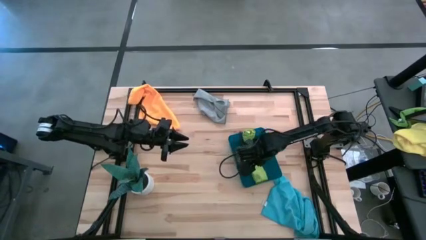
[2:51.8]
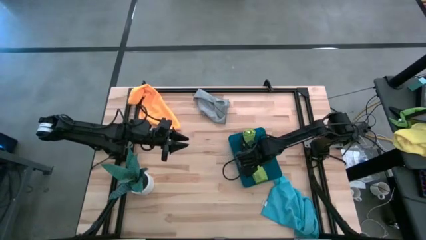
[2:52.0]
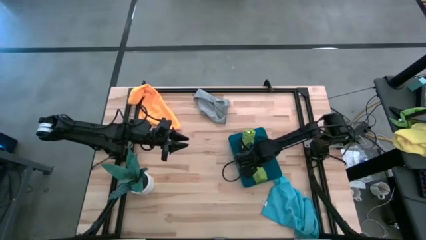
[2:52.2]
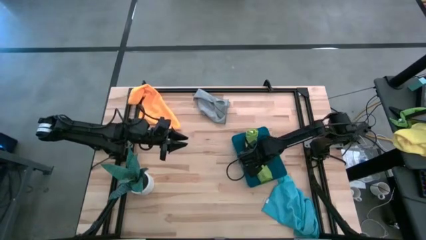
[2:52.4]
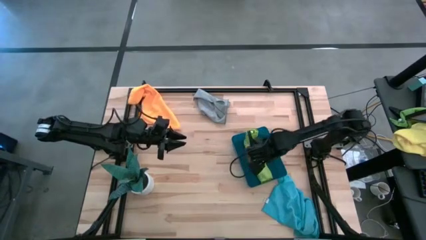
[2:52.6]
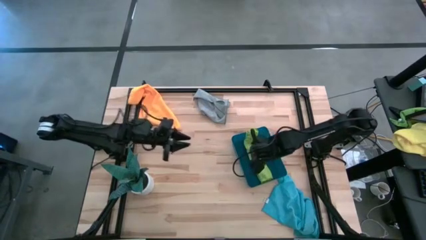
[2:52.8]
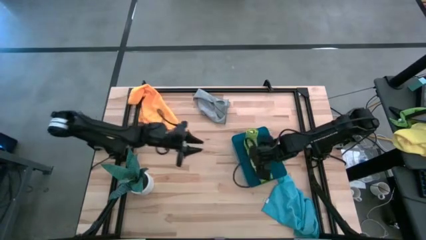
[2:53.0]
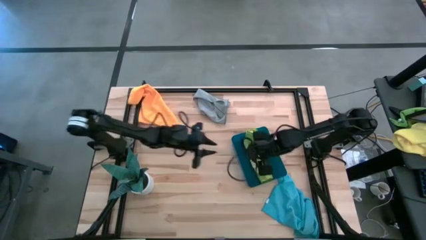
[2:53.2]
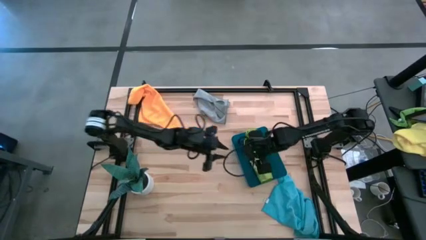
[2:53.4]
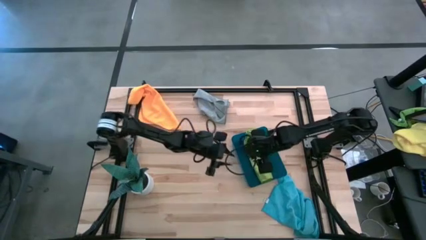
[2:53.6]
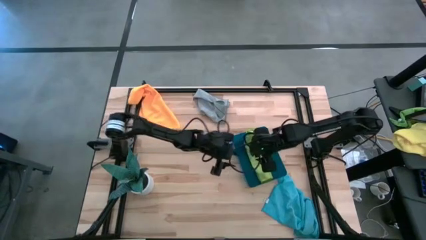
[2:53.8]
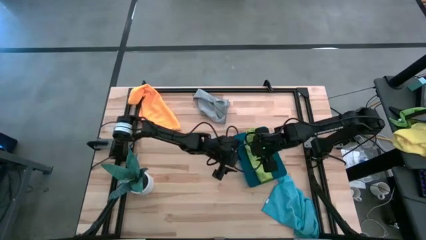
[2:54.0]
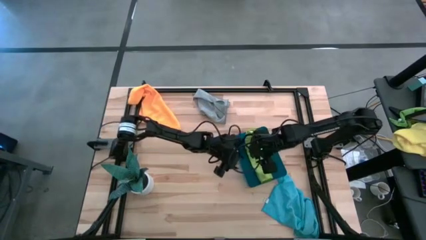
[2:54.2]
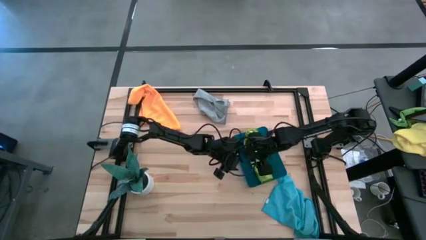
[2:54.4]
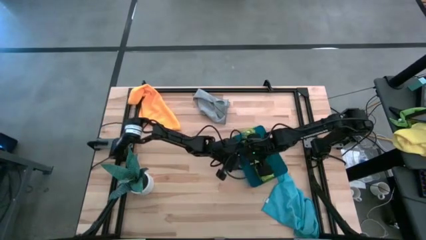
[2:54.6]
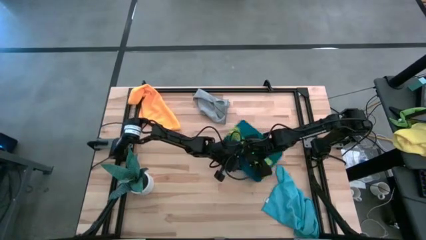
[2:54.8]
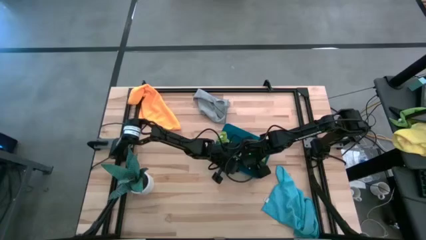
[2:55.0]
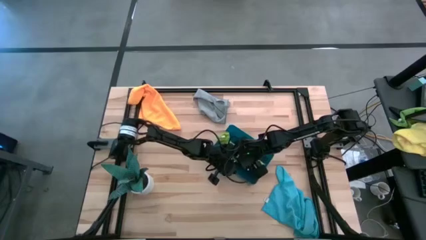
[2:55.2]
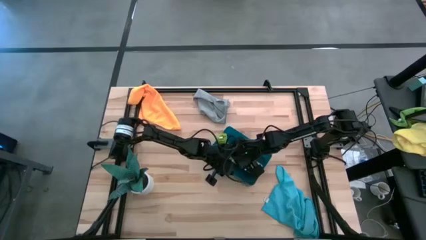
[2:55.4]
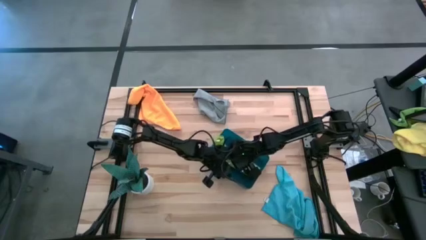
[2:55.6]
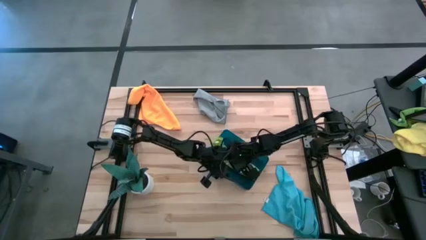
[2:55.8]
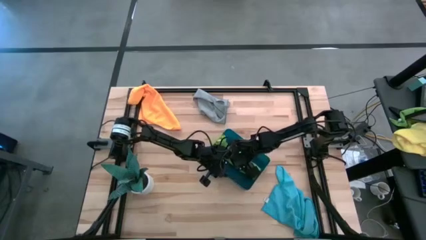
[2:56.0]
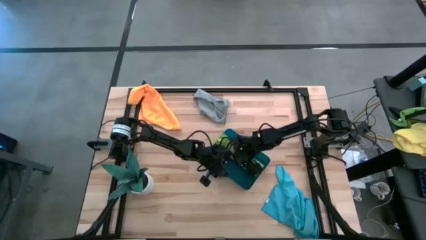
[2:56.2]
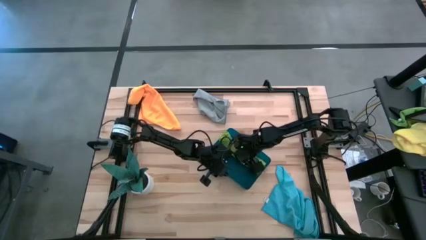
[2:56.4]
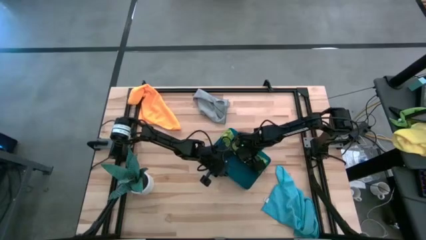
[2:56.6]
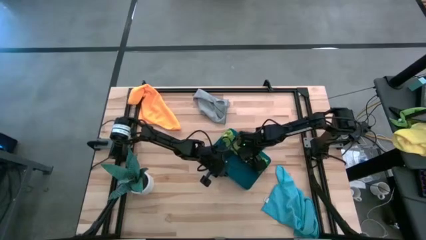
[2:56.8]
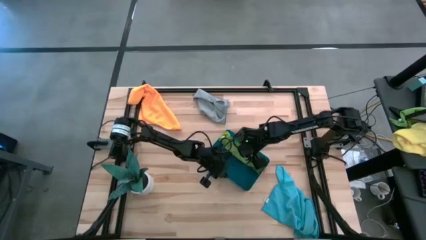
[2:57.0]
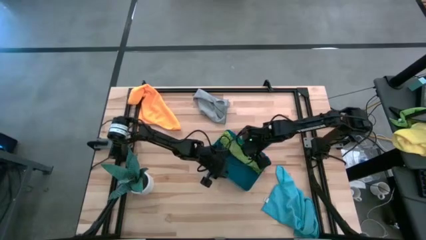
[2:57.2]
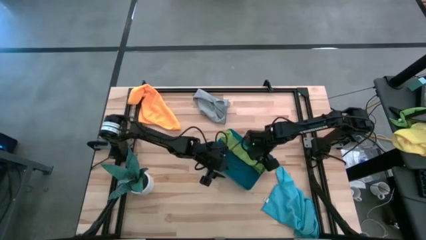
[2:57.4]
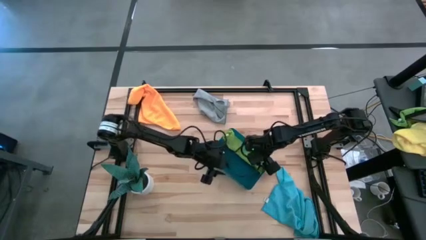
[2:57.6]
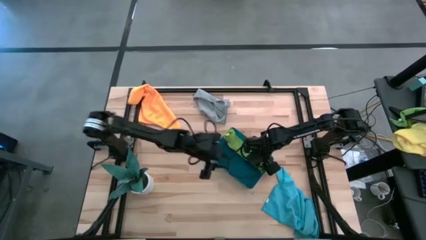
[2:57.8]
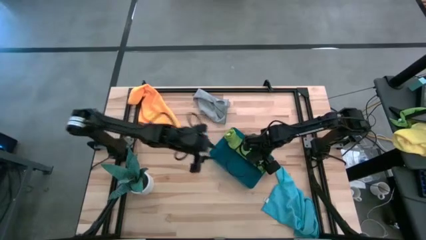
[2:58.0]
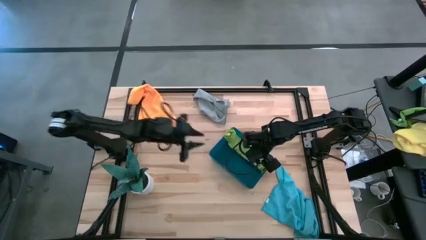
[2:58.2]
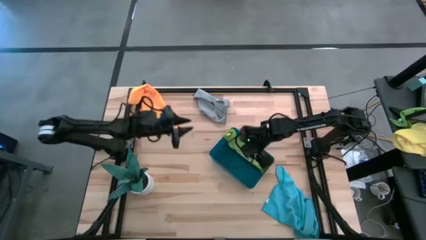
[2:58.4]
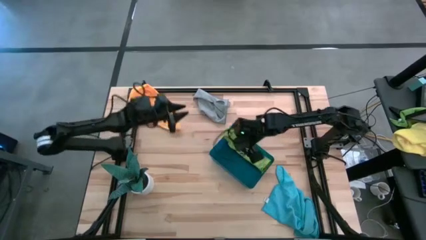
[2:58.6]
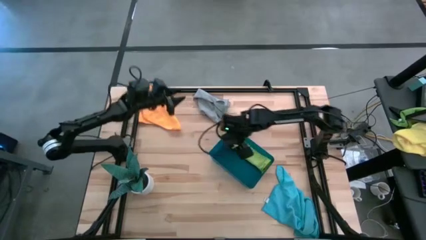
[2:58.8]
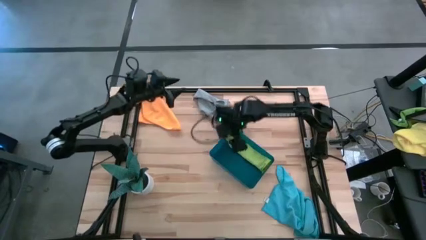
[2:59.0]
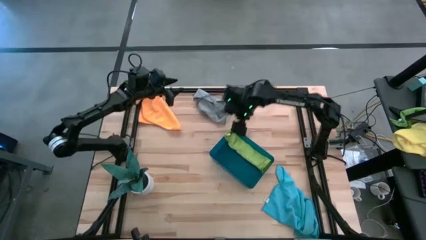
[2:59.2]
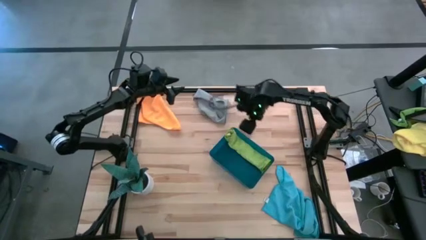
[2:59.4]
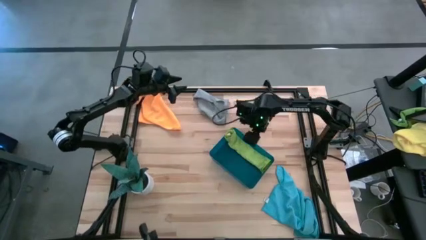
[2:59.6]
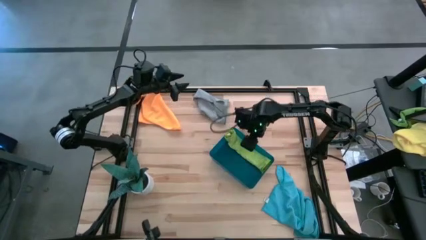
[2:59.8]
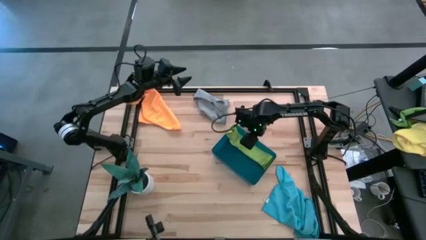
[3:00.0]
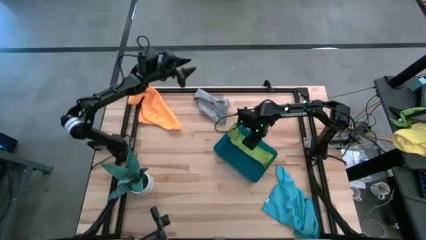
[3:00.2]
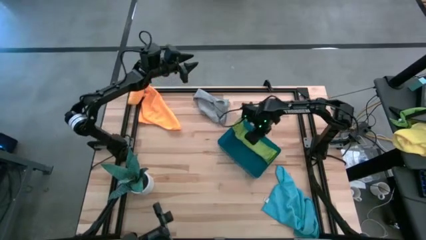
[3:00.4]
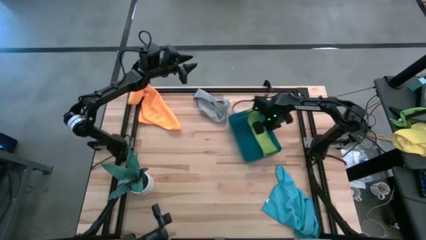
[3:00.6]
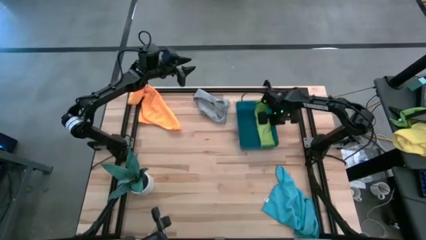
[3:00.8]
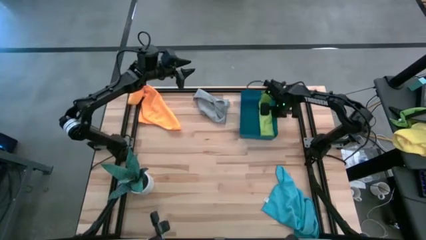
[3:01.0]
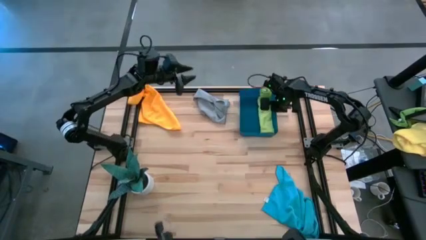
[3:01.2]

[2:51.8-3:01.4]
Task: Roll microfiber towels into tight, uniform cylinder then place into a basket
Move the blue bin to the top right of the table

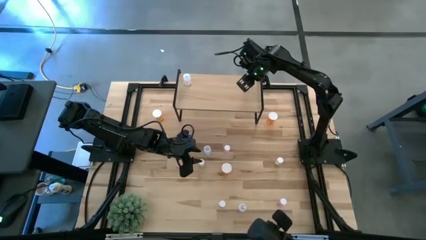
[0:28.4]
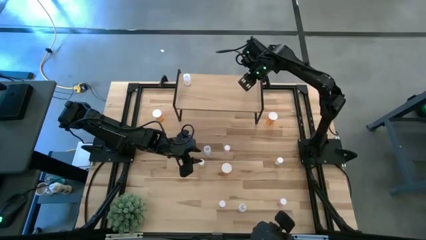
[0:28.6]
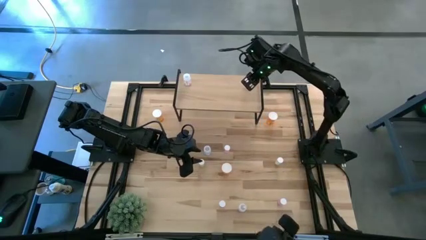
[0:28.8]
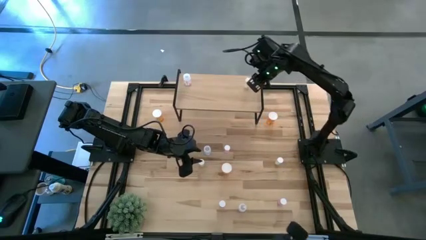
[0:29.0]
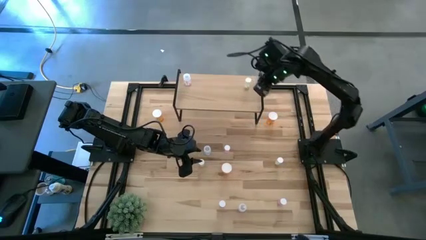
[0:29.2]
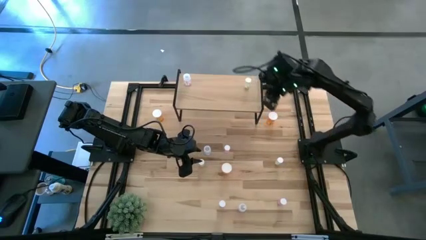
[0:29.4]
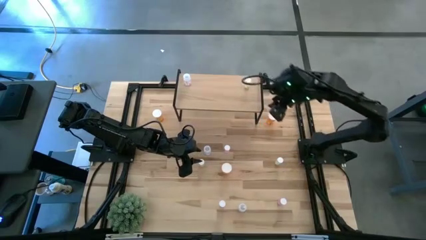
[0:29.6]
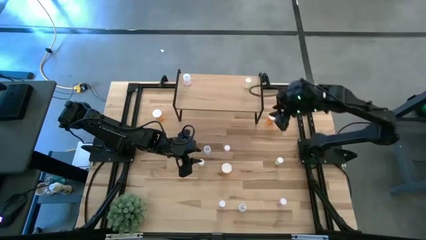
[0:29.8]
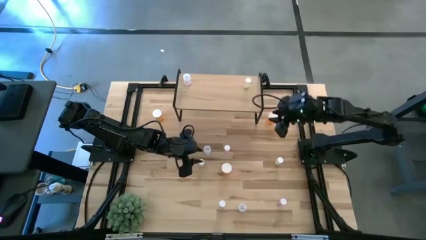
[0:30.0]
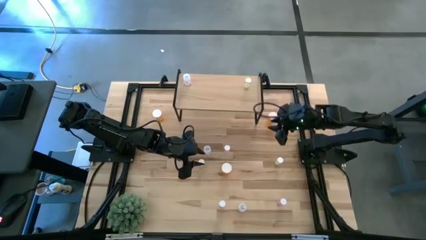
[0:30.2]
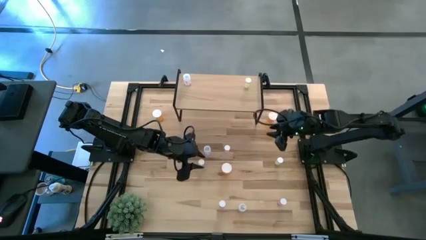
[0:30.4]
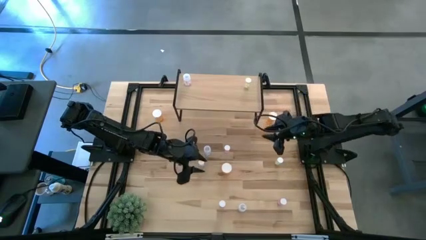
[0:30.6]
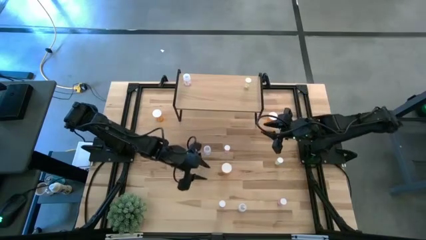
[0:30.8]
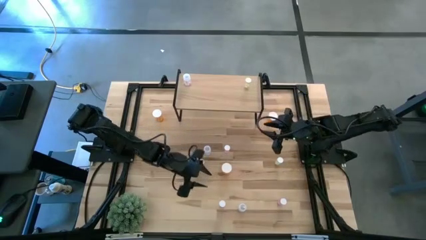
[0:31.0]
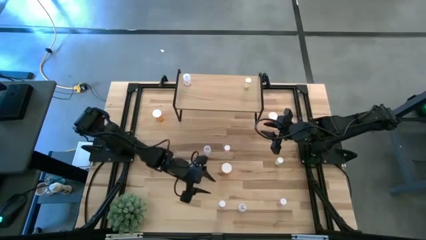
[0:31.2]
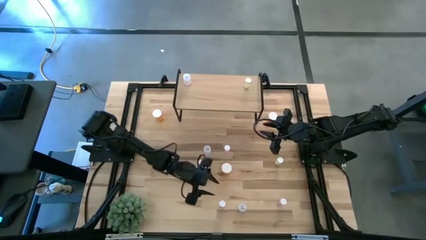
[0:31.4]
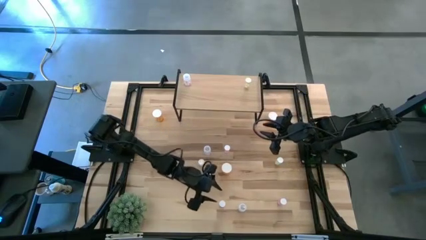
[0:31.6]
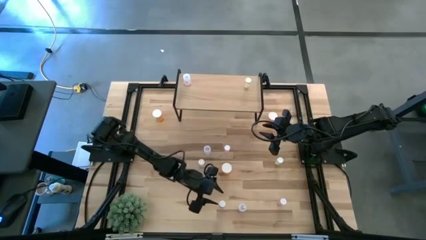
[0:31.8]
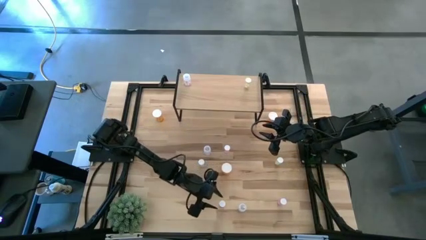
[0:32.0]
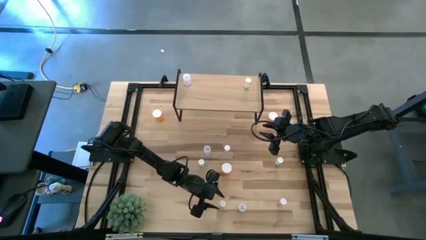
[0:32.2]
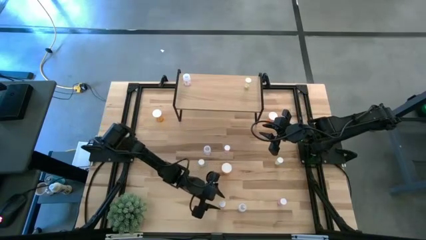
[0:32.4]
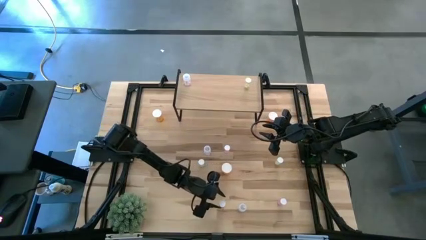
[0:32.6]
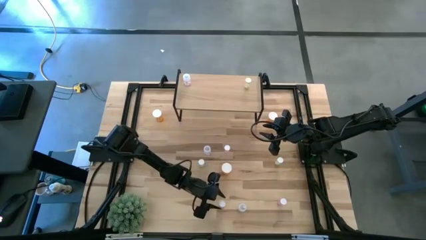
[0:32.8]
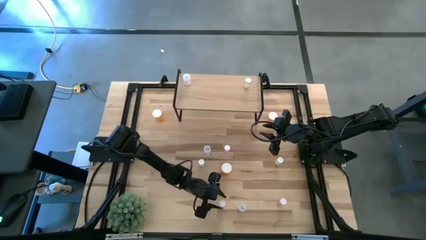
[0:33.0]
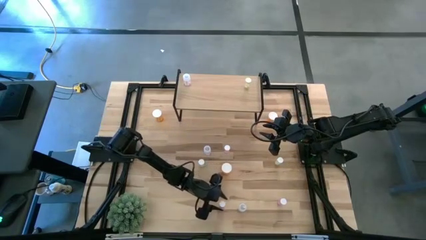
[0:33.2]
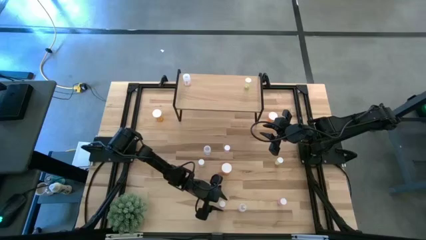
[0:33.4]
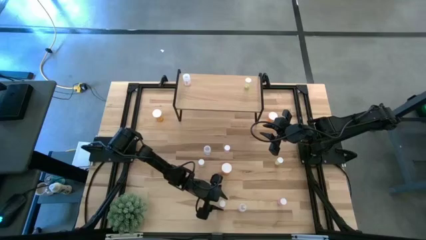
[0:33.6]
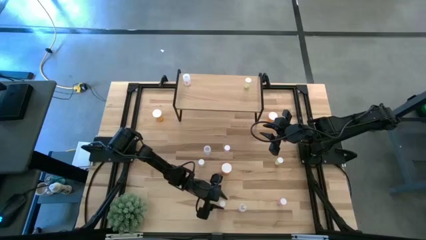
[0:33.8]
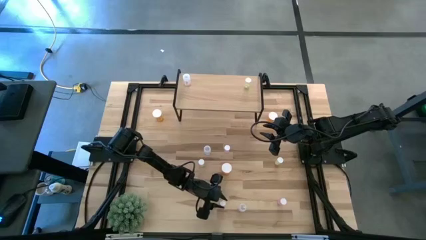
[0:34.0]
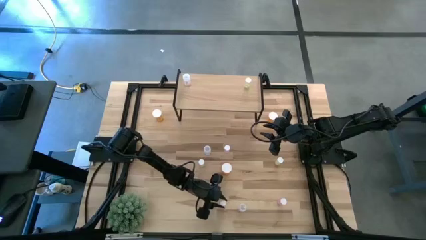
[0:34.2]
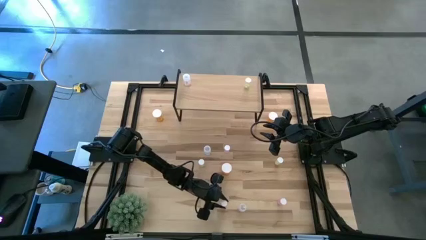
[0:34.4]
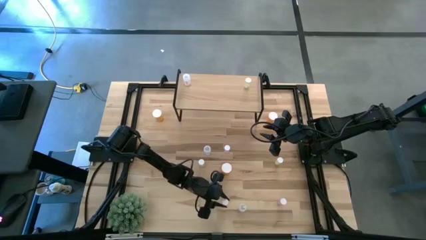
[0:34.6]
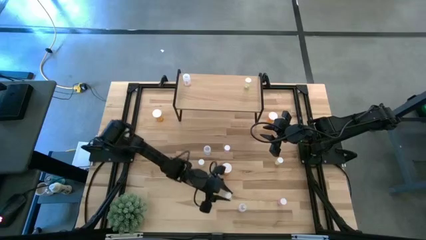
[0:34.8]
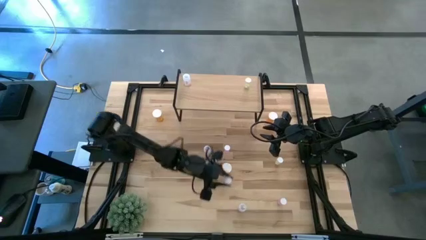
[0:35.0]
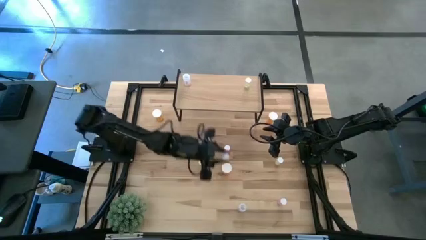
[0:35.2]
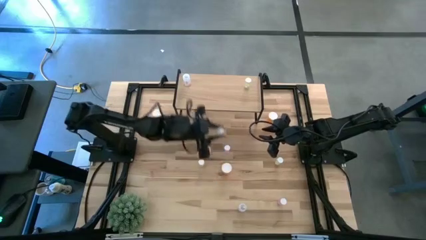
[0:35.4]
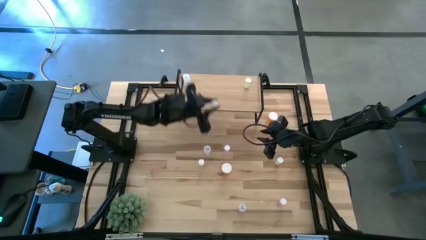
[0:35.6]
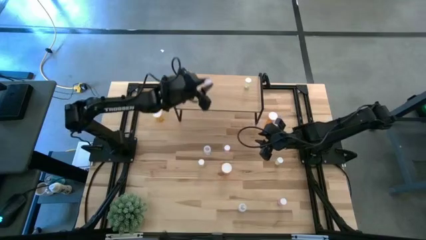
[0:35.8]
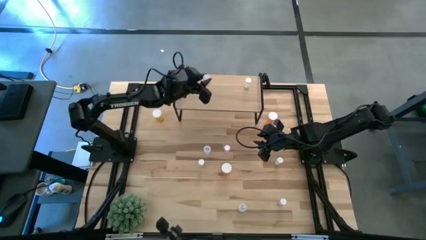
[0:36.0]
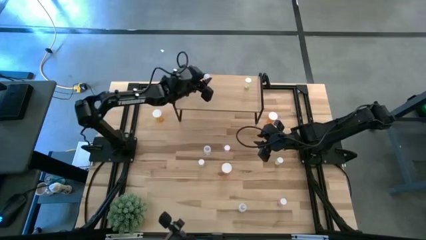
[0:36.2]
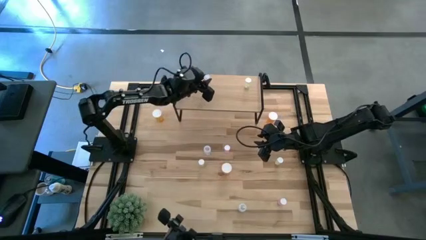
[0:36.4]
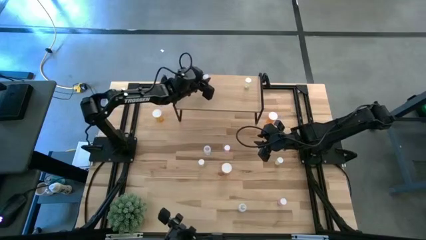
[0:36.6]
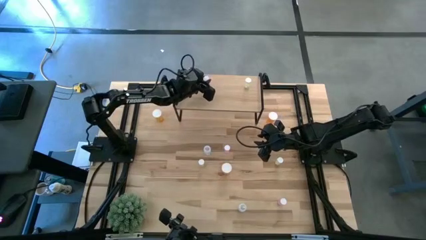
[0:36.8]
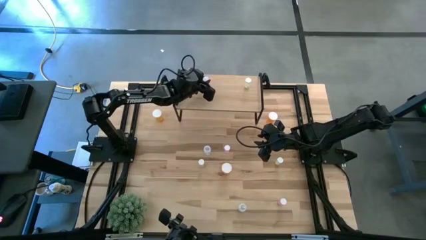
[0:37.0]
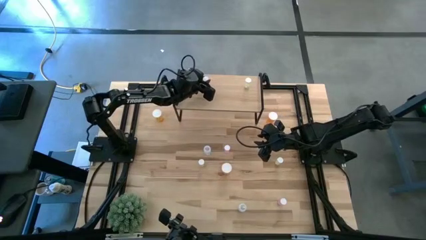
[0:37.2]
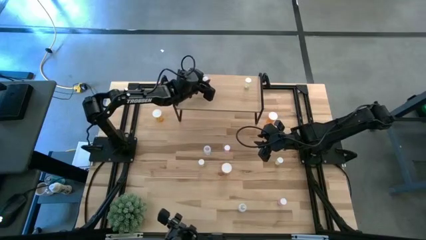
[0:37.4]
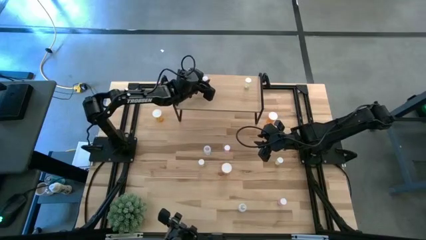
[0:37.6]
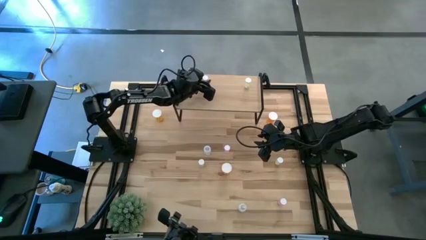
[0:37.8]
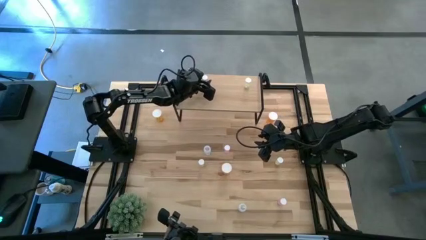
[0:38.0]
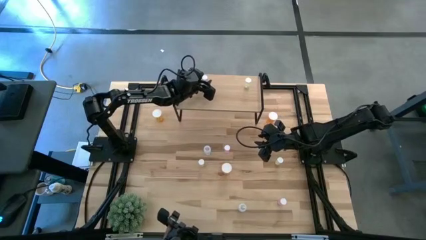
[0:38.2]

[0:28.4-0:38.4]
Task: Pick and place medicine bottles onto shelf by color
Put the bottom left pink pill bottle on the shelf
